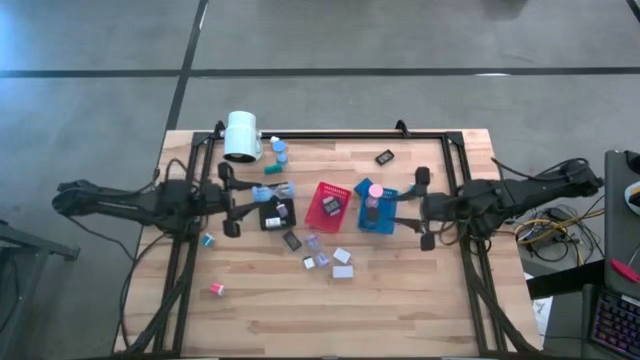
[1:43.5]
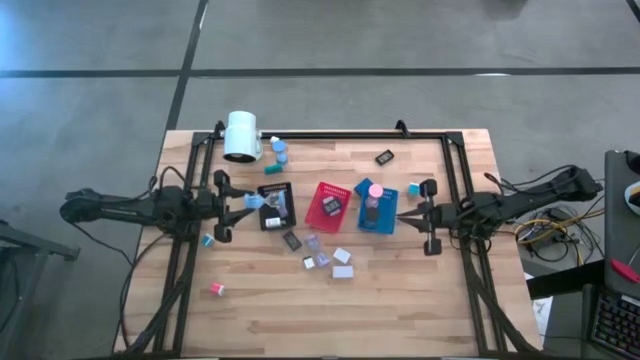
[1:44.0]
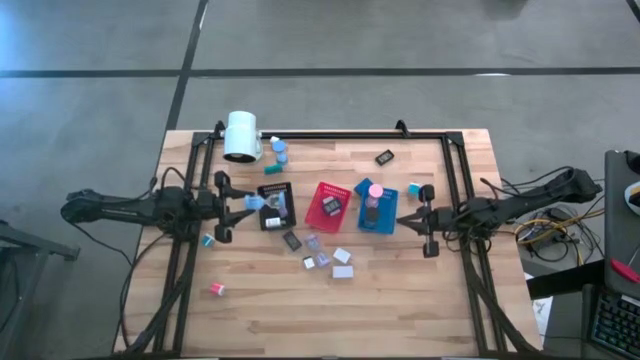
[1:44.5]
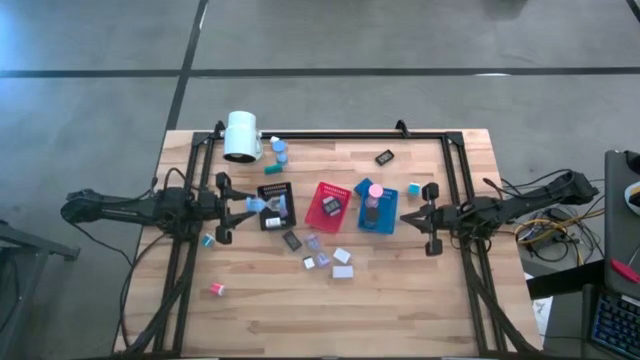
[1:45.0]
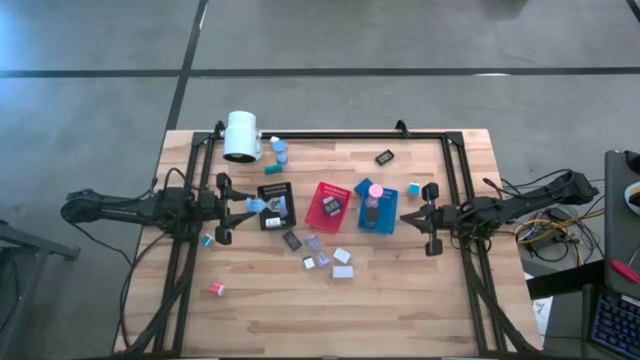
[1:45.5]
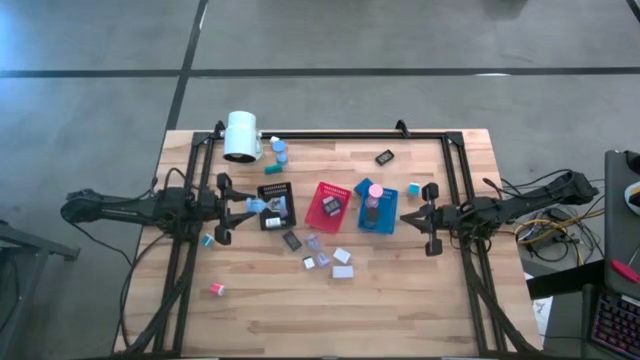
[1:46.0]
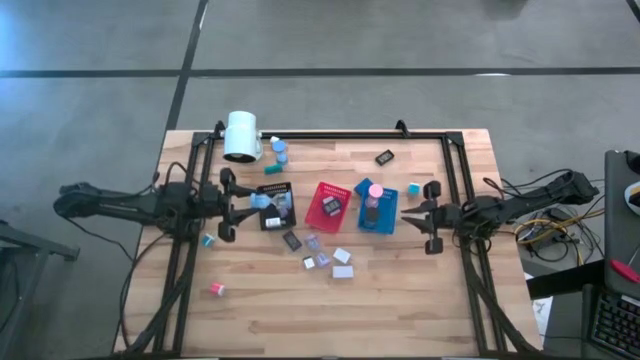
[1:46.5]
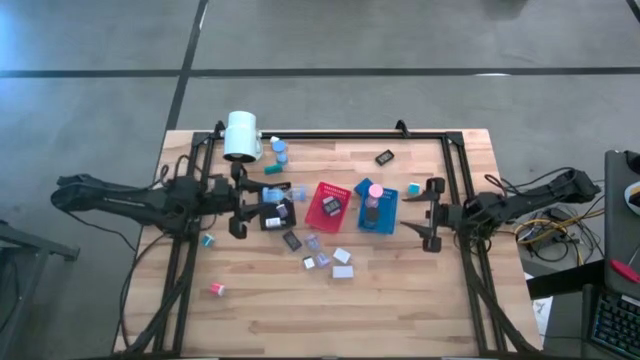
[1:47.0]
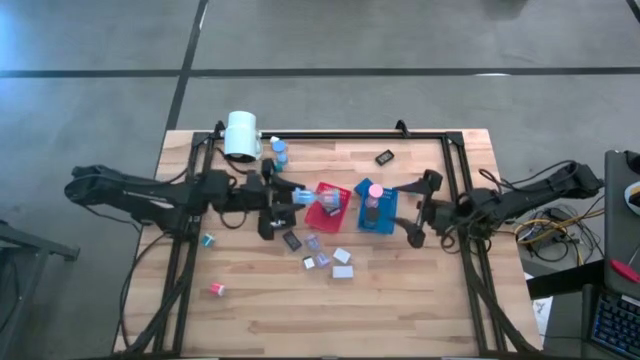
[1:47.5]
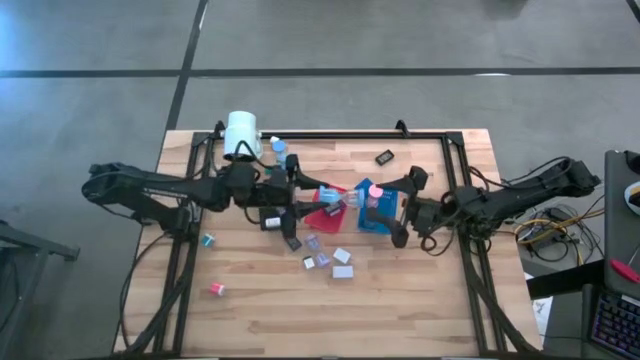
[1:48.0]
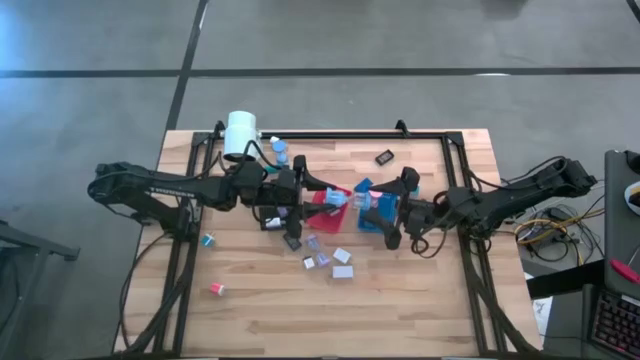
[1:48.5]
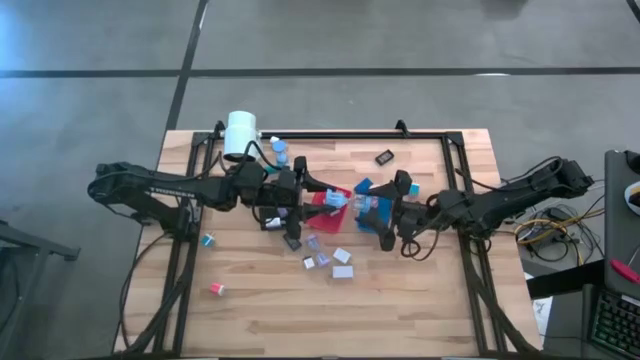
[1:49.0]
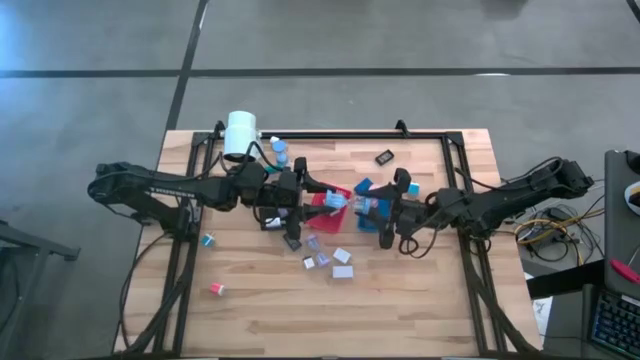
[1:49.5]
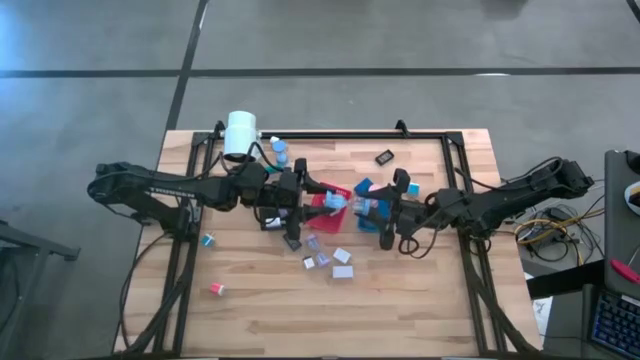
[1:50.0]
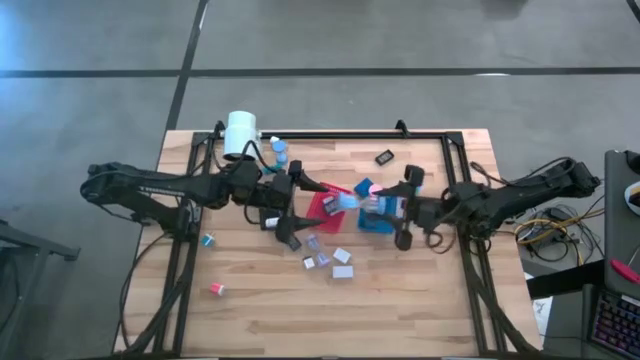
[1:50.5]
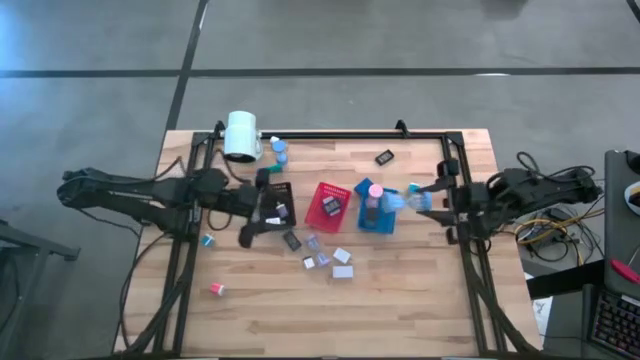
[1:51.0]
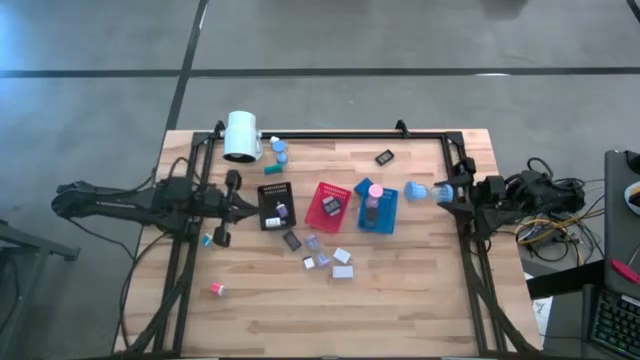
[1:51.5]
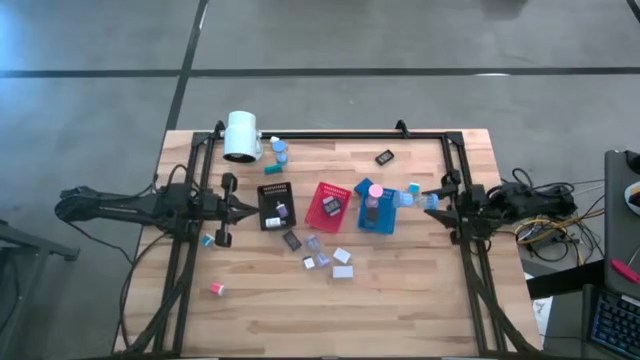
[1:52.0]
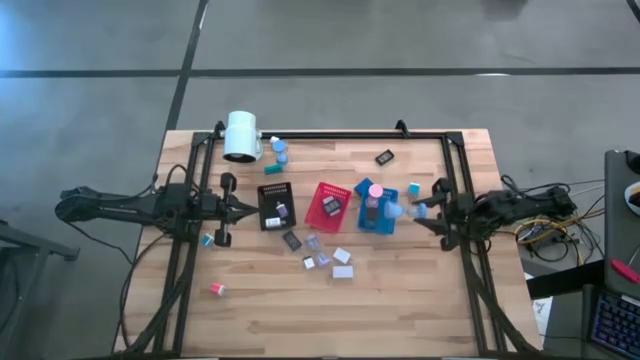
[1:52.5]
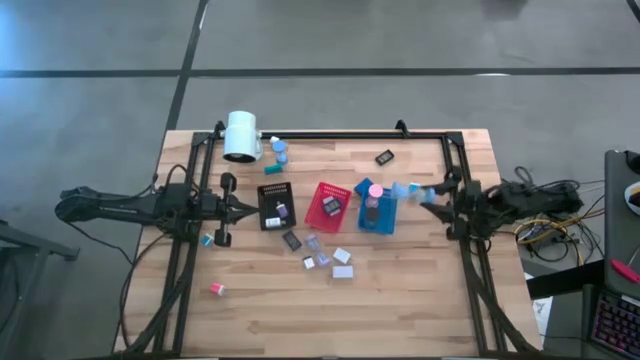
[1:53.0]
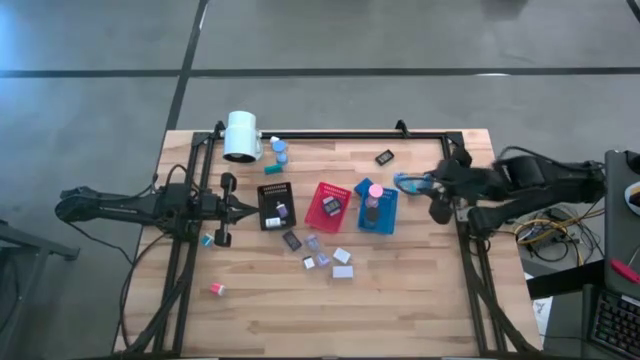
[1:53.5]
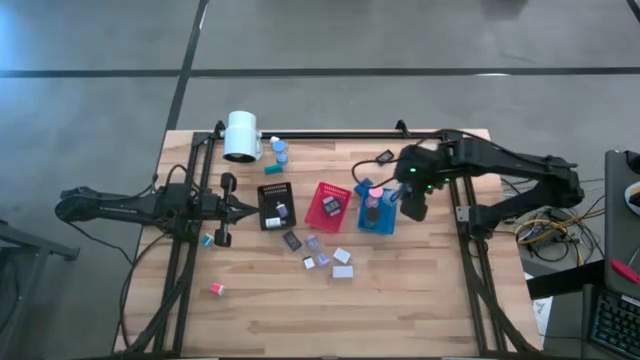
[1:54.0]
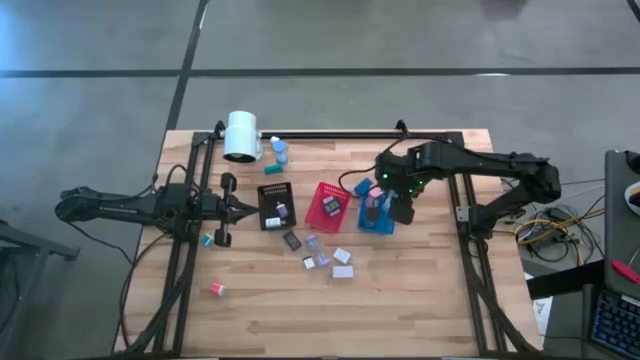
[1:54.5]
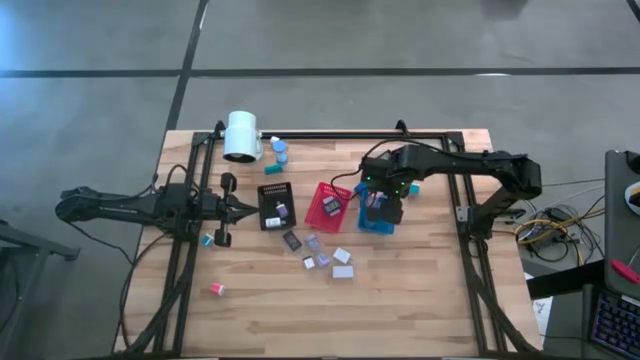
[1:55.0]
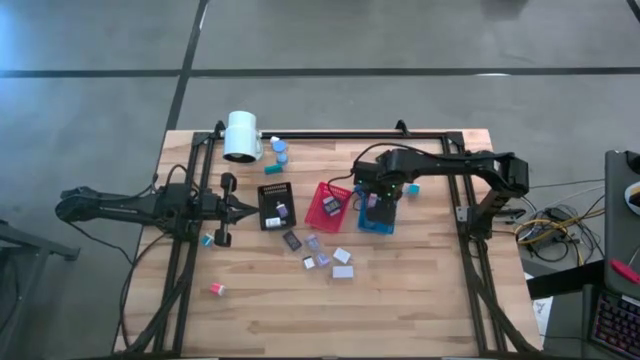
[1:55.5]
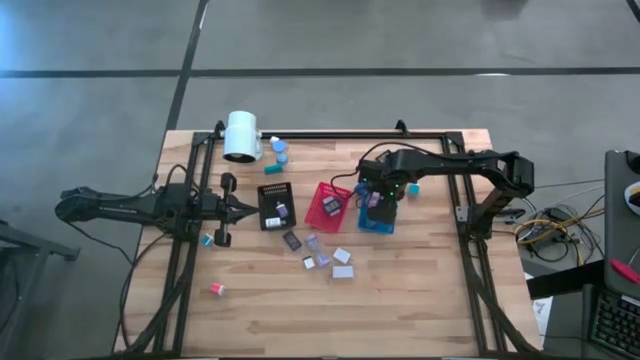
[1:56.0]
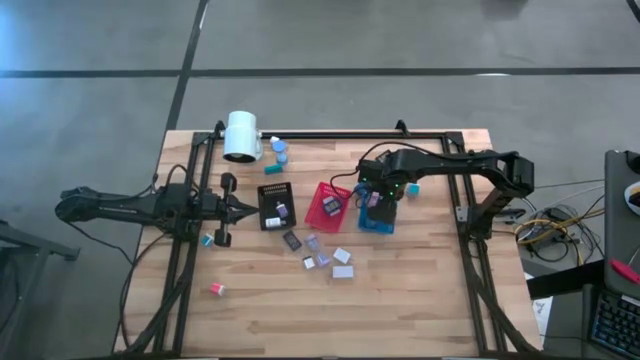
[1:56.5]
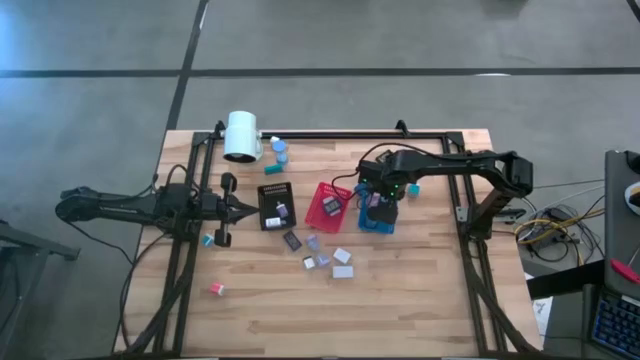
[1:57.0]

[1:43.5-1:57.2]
Task: Pick & Place Office items
Put the bottom blue hourglass into the blue bin

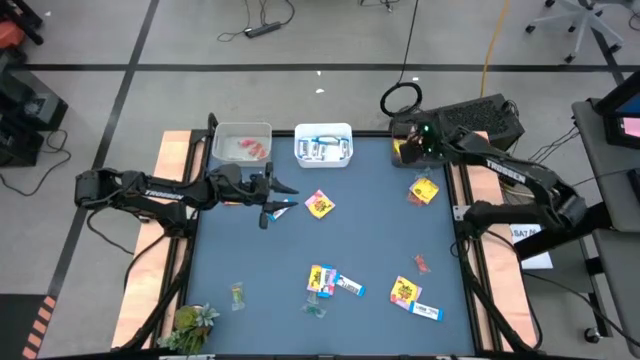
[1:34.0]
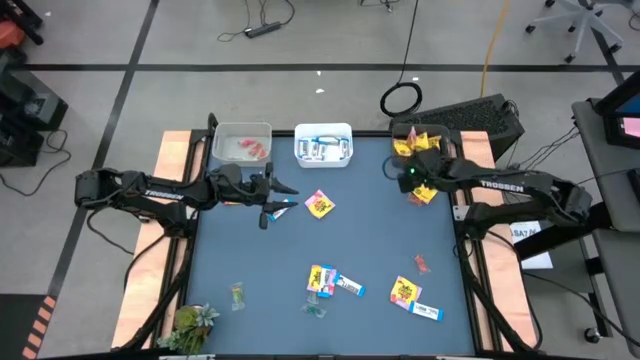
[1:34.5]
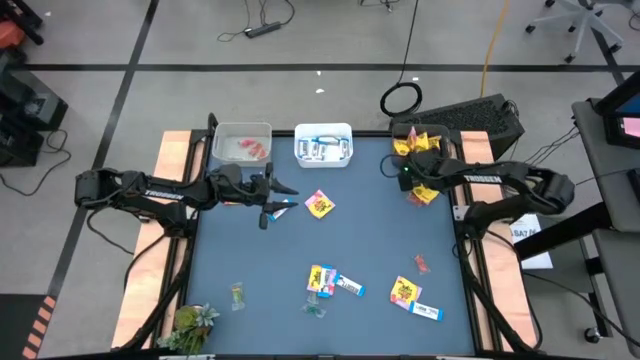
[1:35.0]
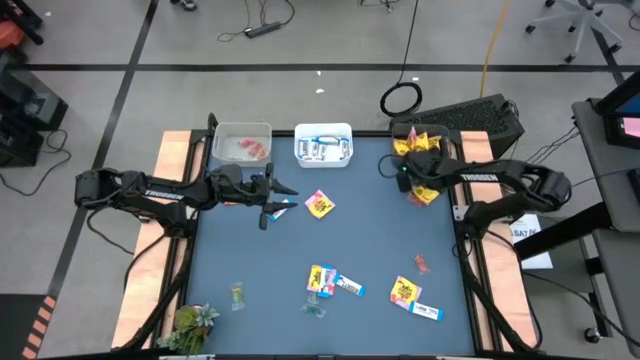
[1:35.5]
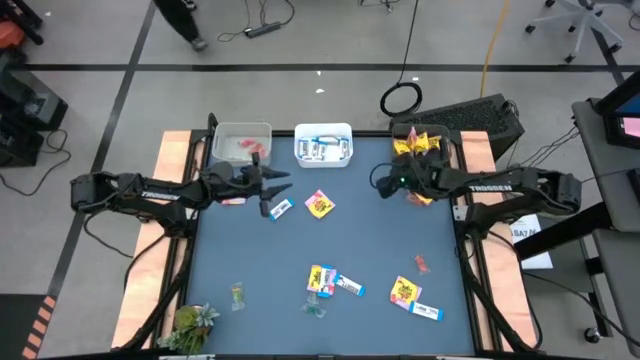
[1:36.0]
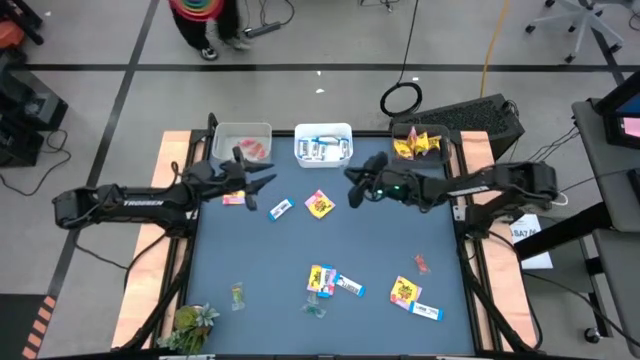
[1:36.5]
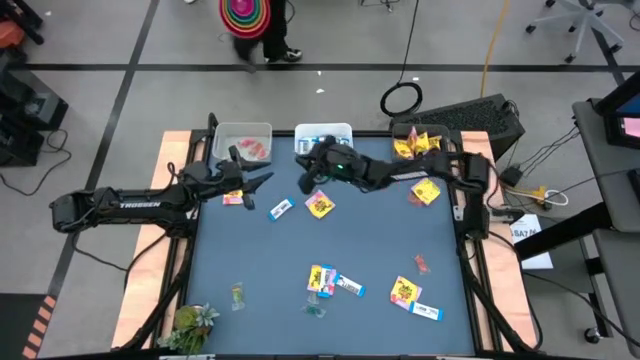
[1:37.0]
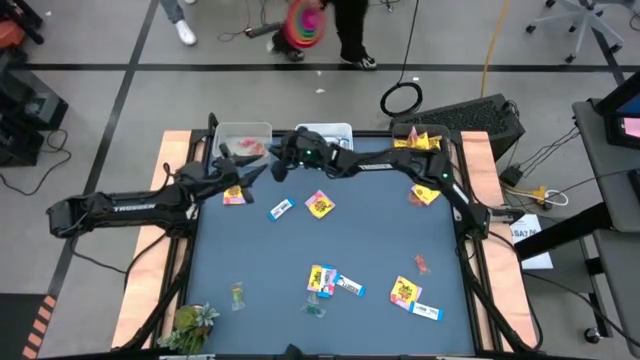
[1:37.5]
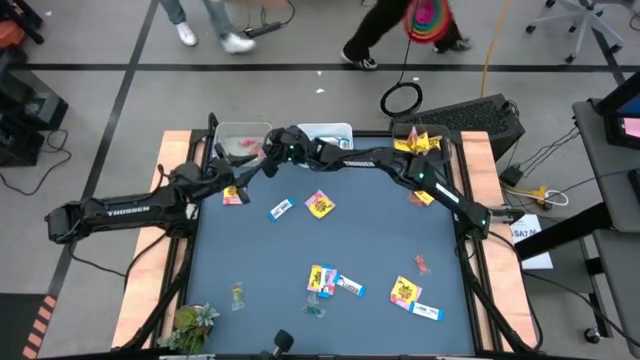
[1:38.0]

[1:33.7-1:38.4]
Task: Sort candy
Put the blue gummy into the gray bin

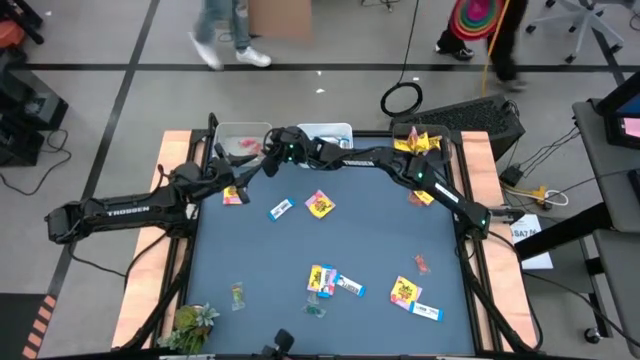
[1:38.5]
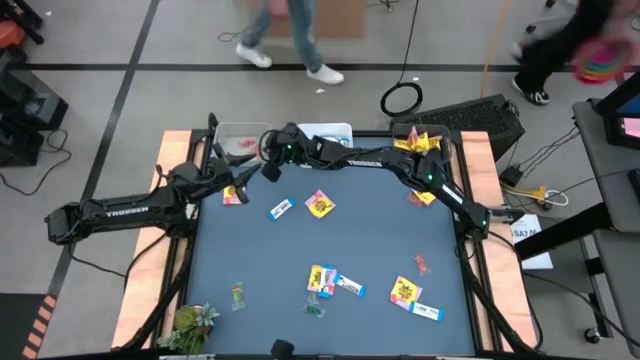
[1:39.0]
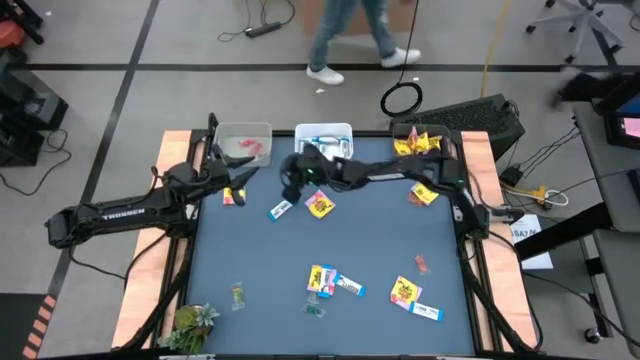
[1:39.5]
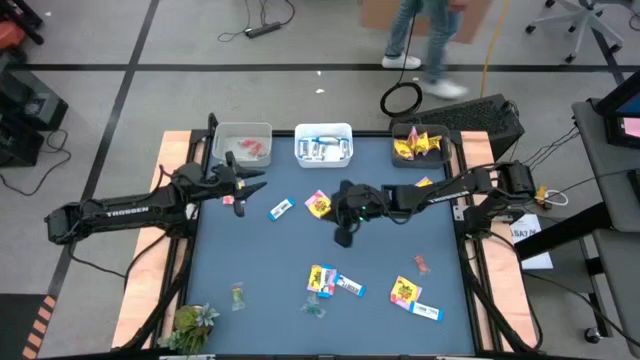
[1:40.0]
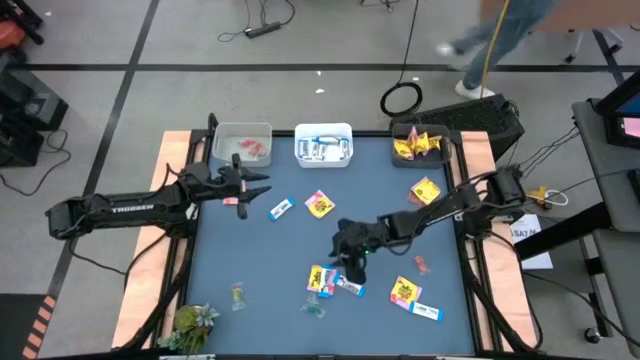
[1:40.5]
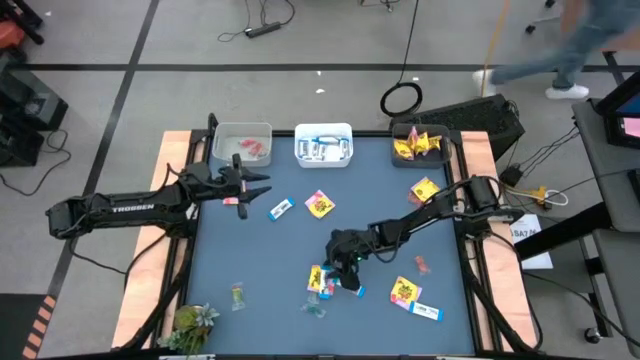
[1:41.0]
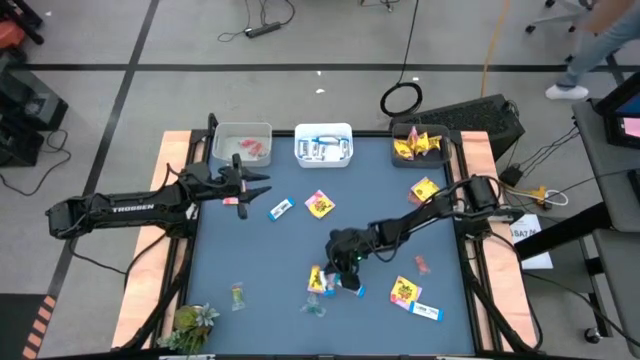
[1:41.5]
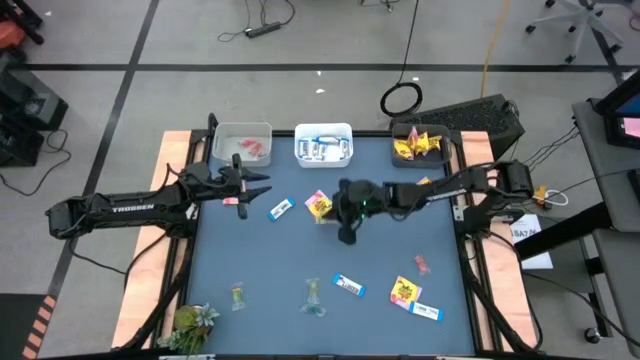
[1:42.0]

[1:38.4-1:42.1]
Put the white chocolate into the white bin
